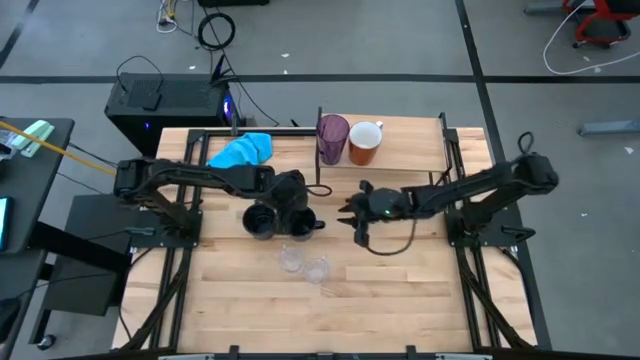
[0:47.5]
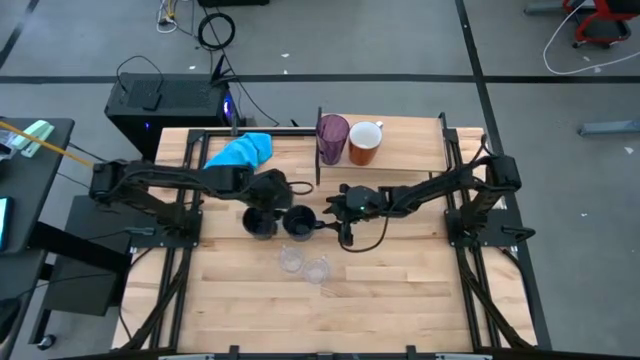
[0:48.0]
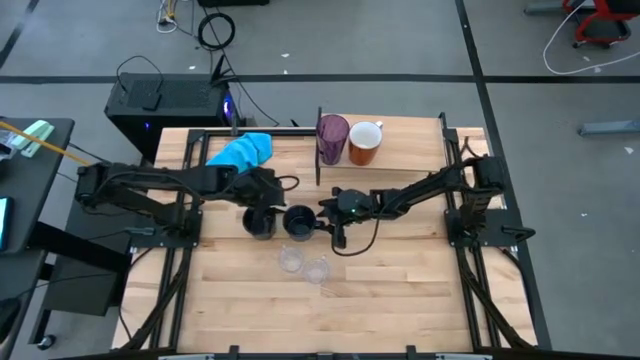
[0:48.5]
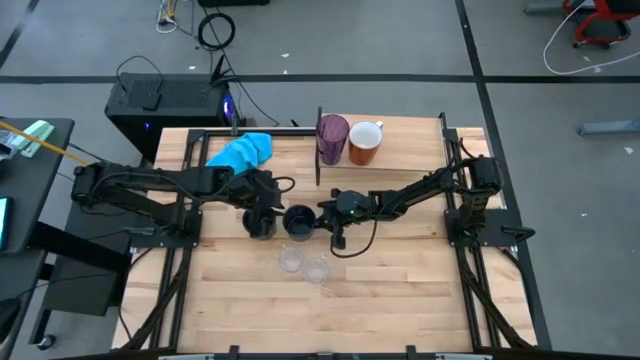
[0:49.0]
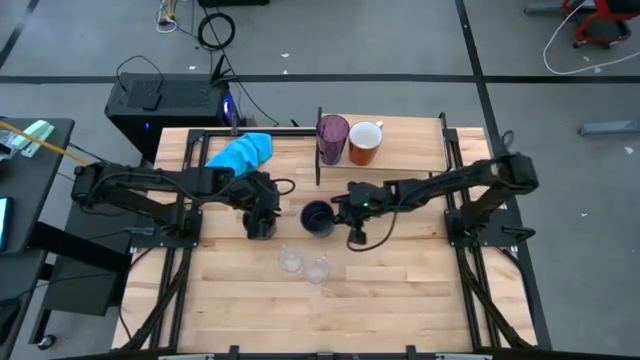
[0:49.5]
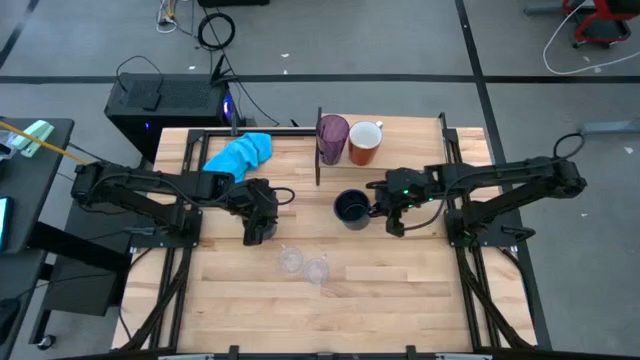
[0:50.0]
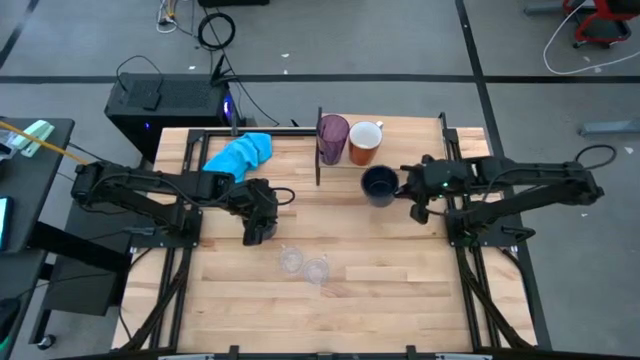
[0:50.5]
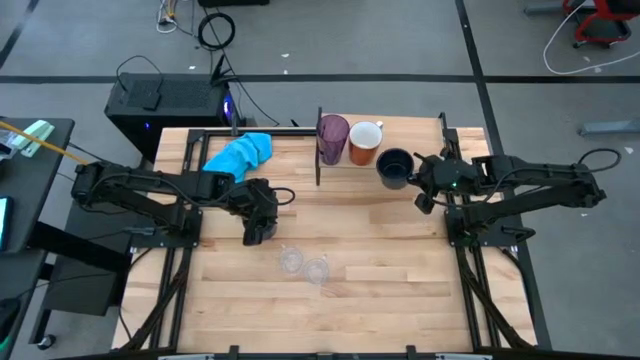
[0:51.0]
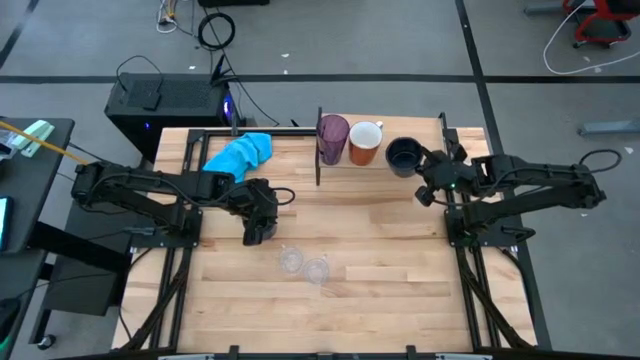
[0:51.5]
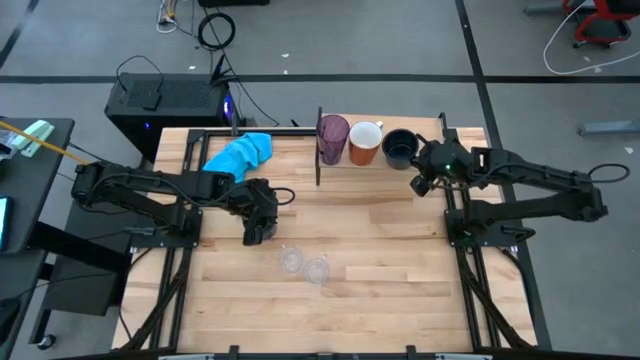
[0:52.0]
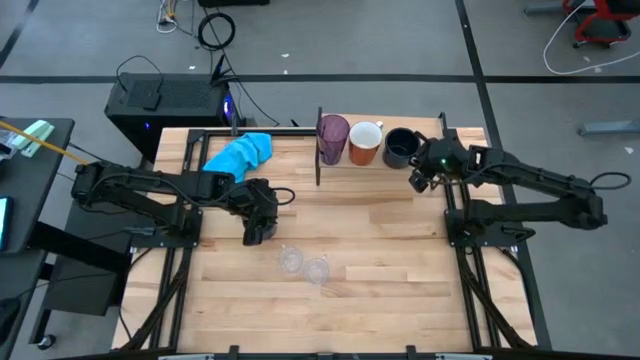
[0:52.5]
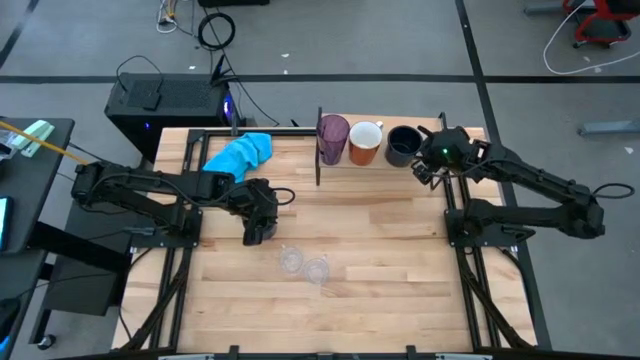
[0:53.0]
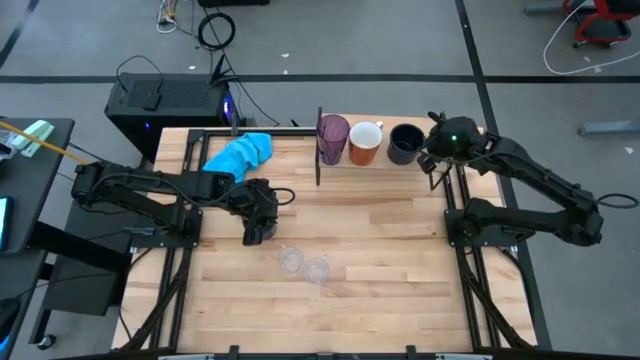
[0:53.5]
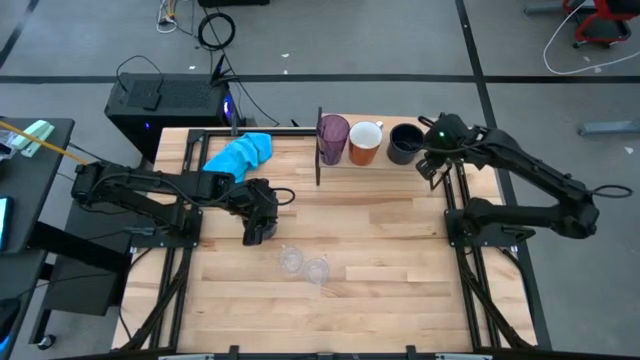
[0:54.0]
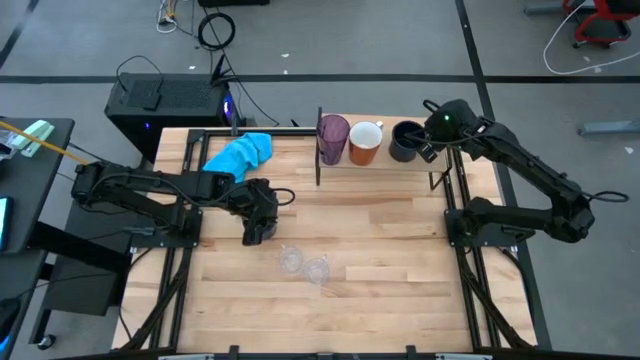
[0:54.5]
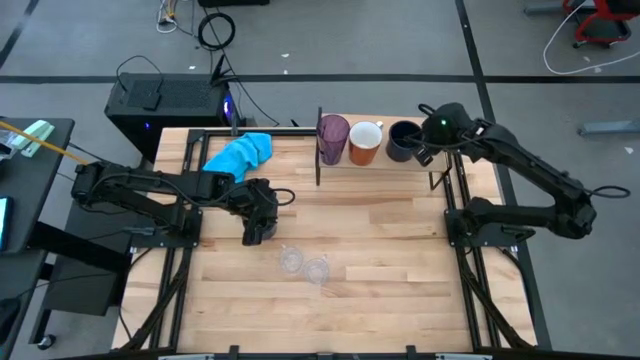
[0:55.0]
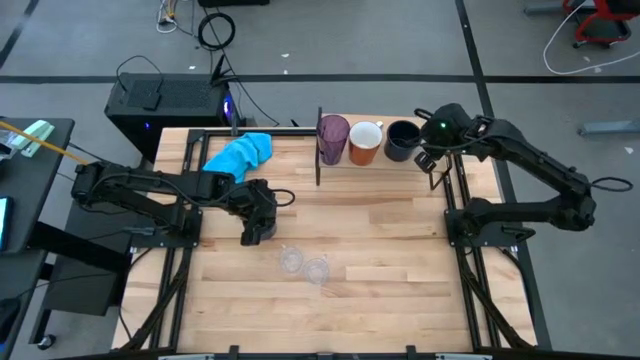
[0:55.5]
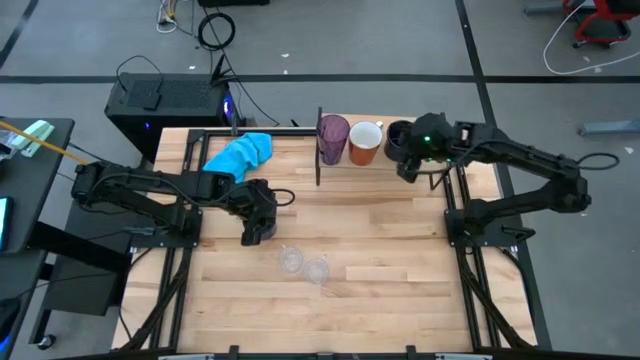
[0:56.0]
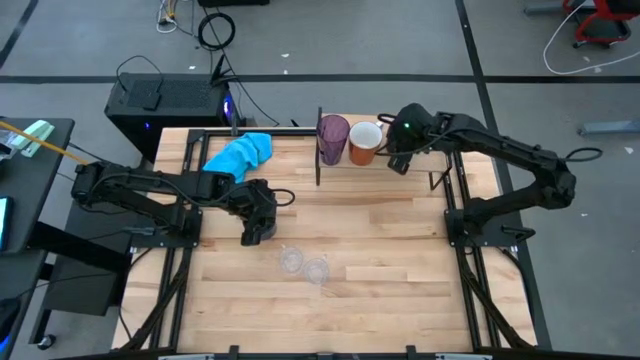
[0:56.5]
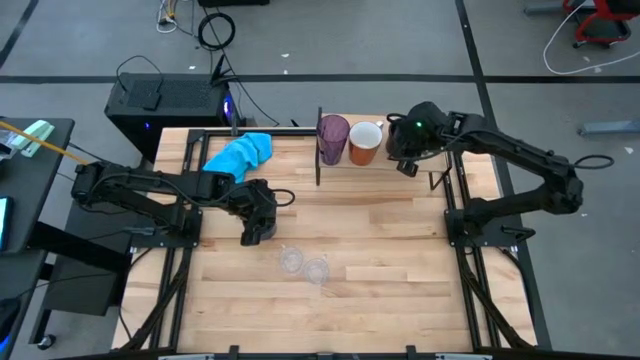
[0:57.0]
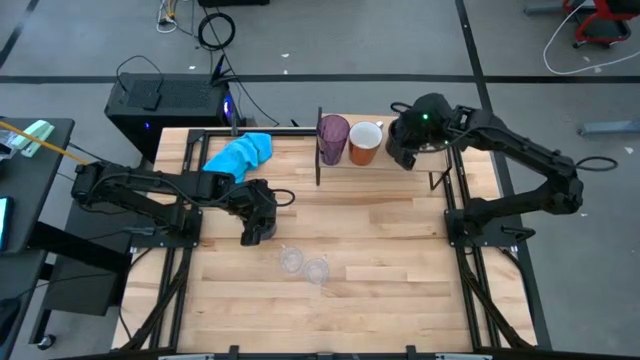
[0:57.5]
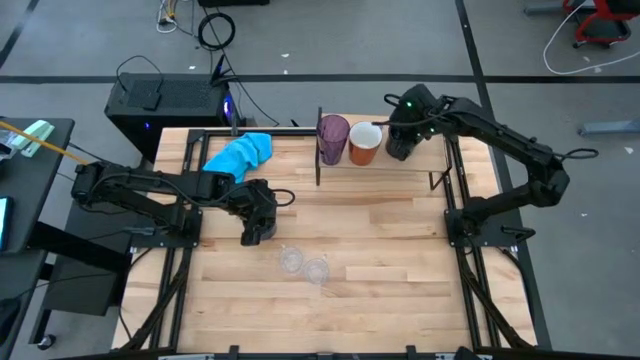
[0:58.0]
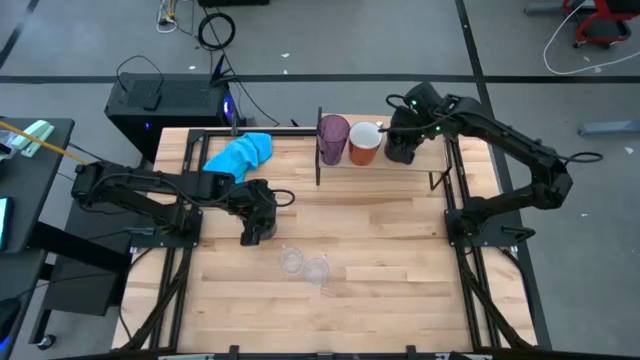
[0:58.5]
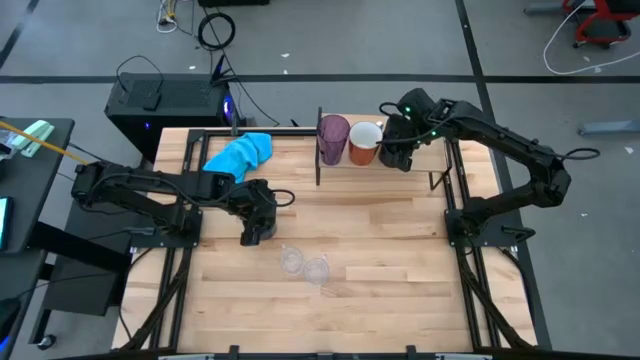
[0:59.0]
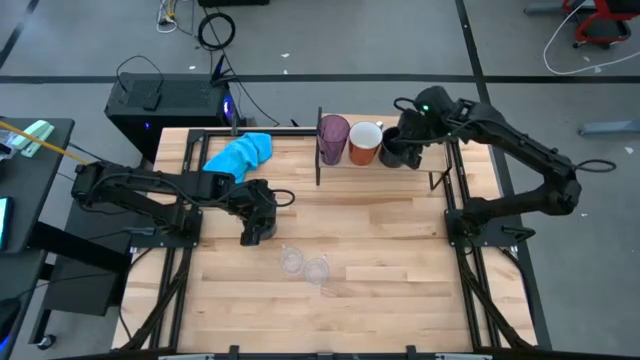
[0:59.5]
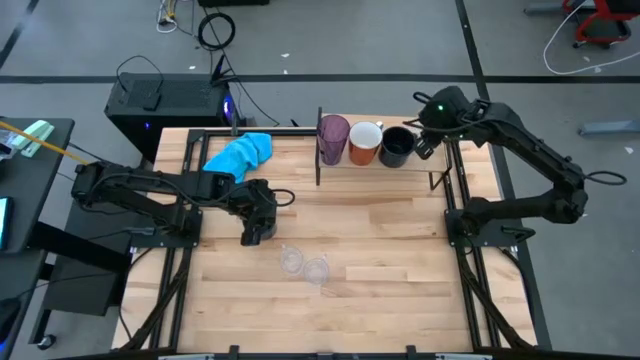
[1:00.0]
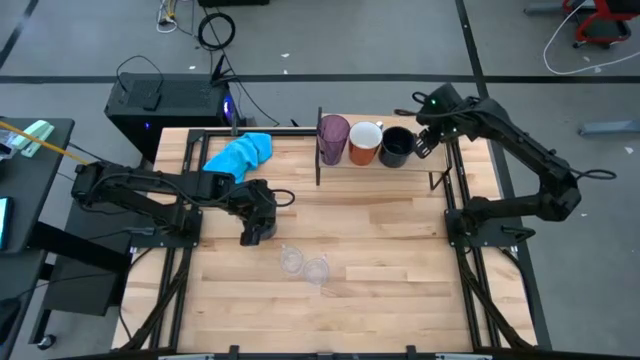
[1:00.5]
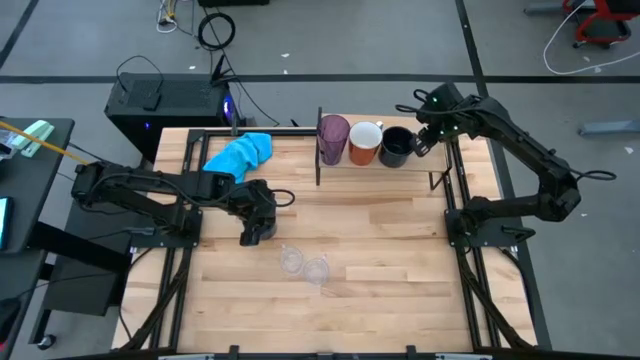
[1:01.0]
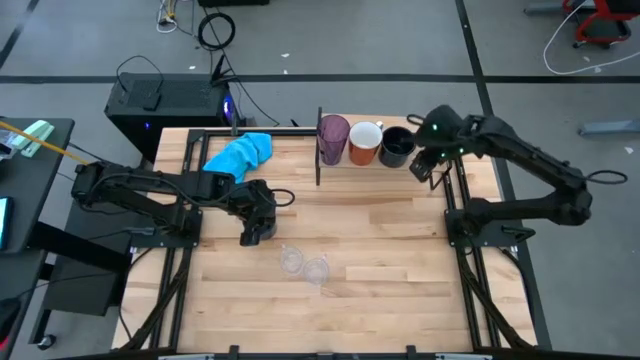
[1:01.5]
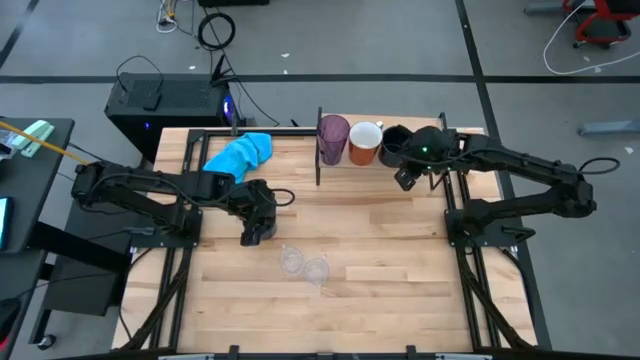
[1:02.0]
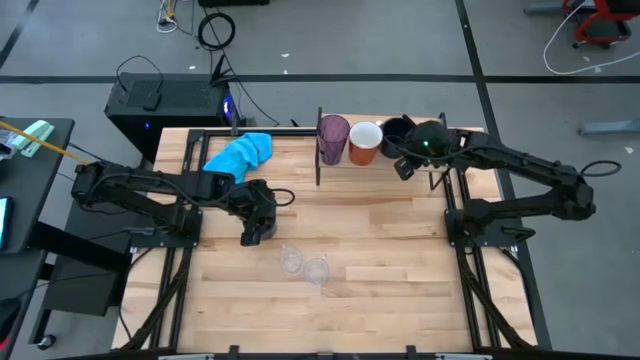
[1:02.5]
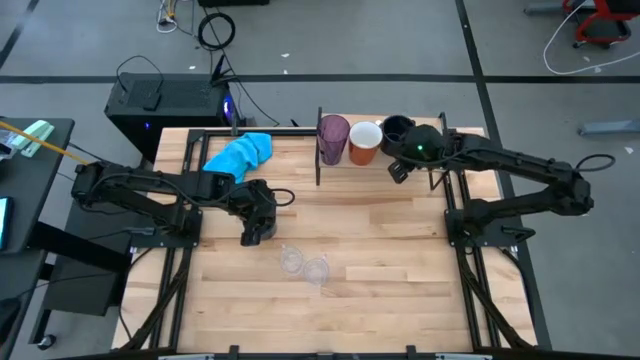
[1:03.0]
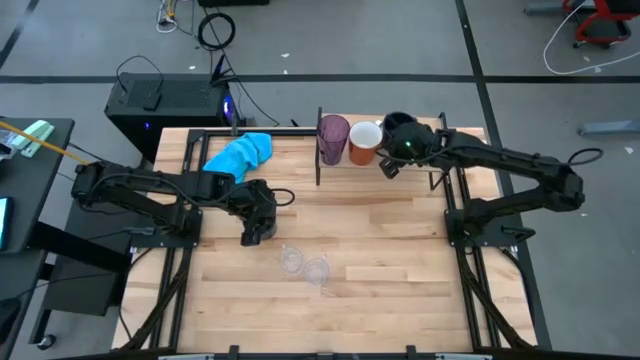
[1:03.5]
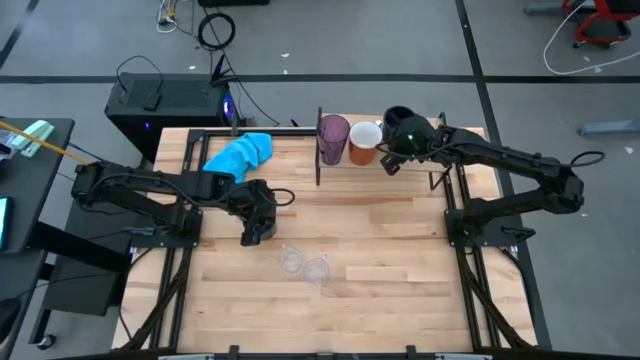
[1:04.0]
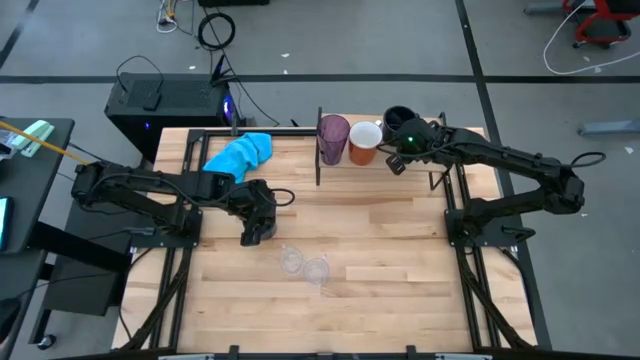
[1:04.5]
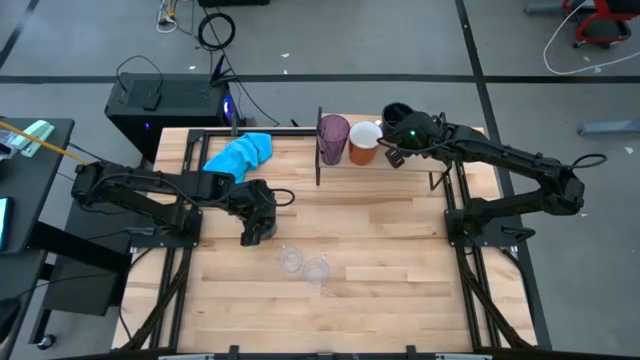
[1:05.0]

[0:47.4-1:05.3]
Task: Stack small to large cups/mugs on shelf
Put the right black mug on the shelf

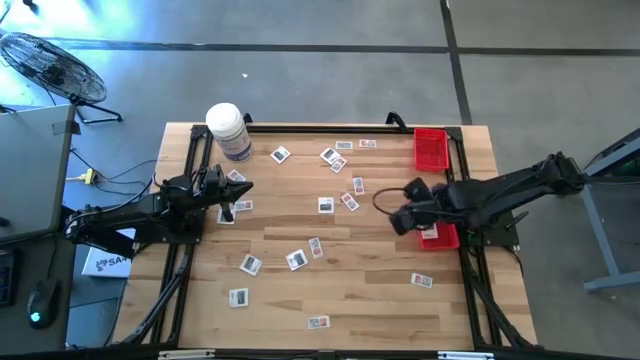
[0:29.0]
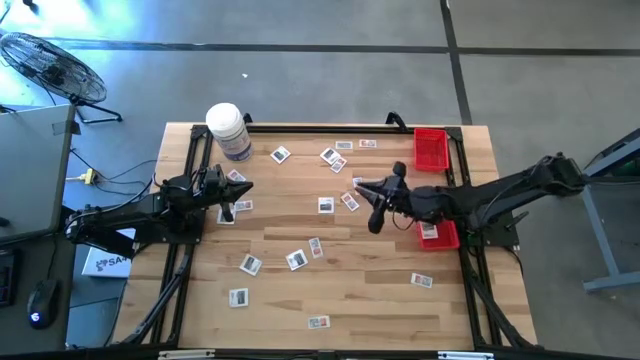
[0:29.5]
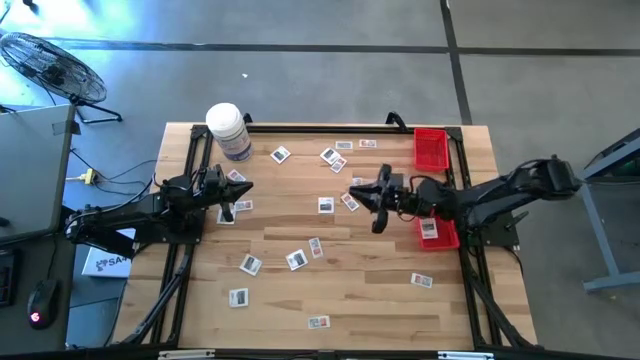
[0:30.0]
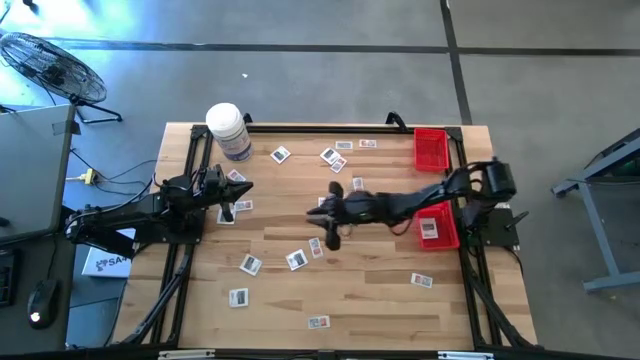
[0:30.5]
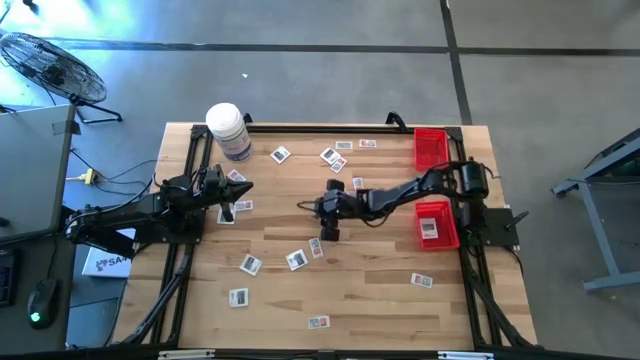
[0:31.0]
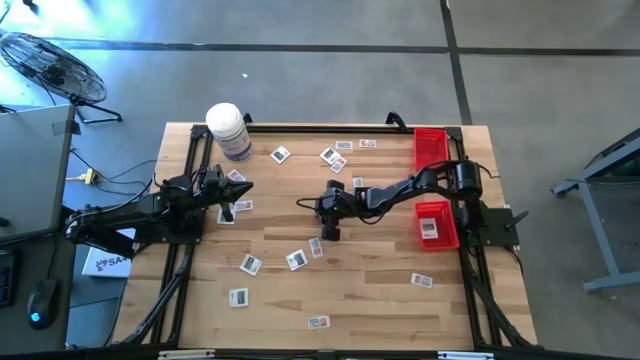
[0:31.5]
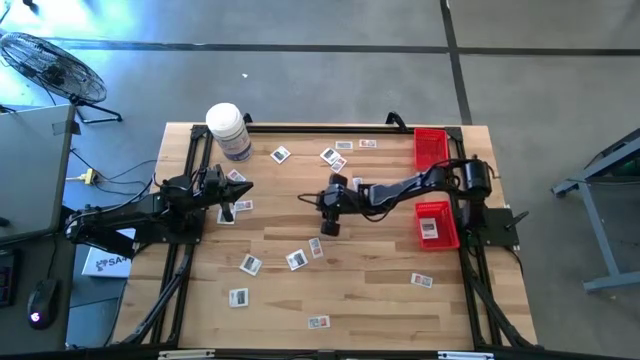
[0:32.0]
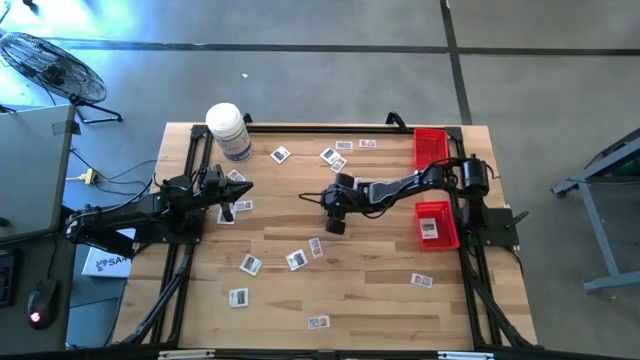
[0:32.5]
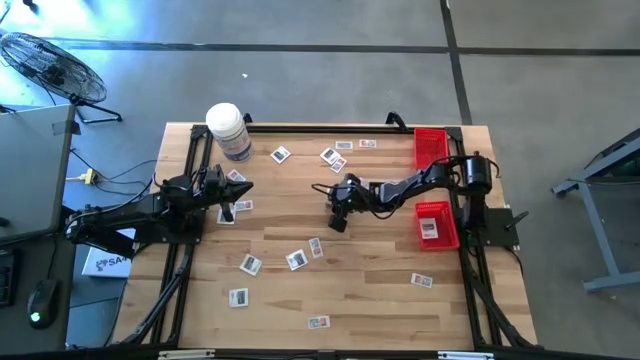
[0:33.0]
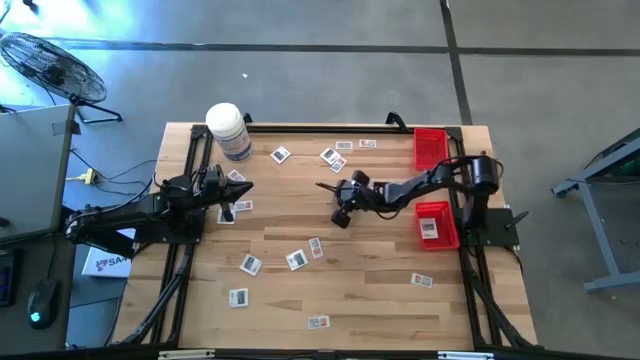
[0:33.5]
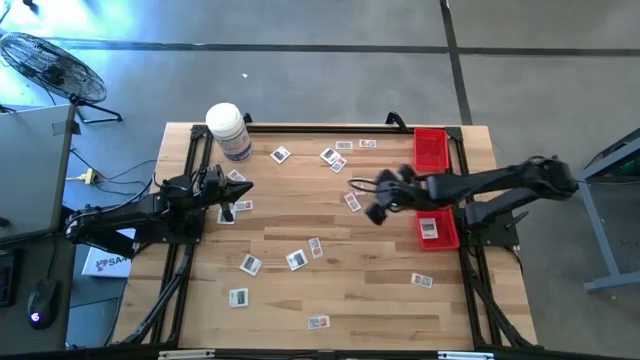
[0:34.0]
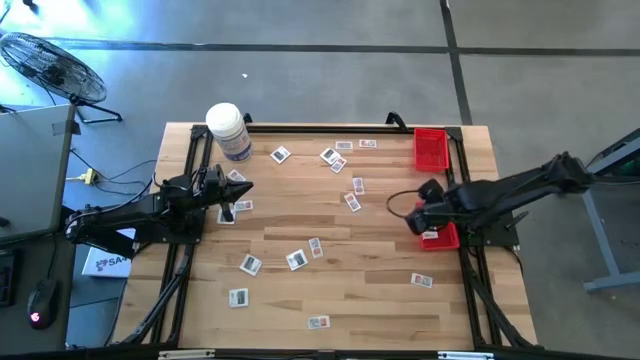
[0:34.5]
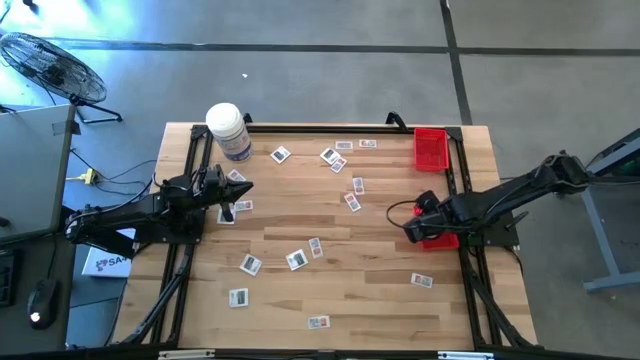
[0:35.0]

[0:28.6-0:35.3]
Task: Pick & Place First Aid Supplies
Put the towelette pack into the bottom basket
